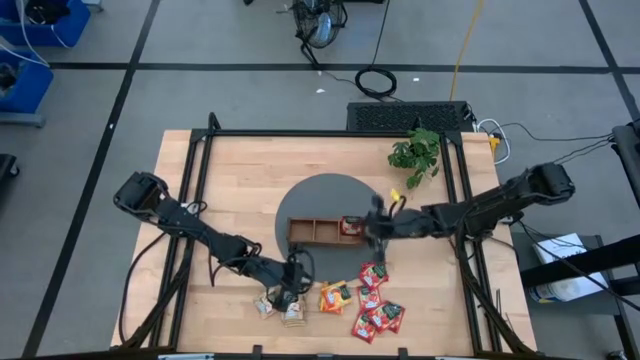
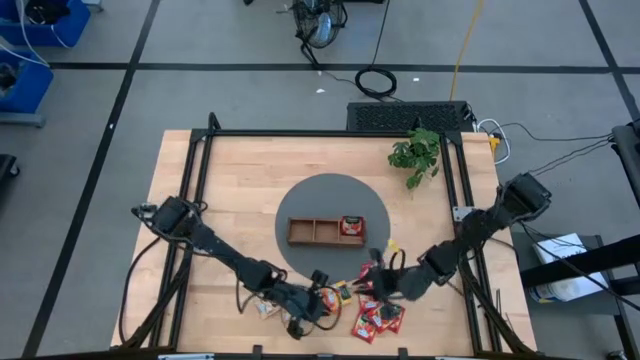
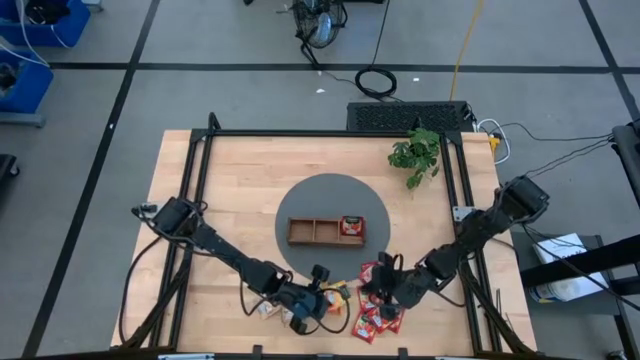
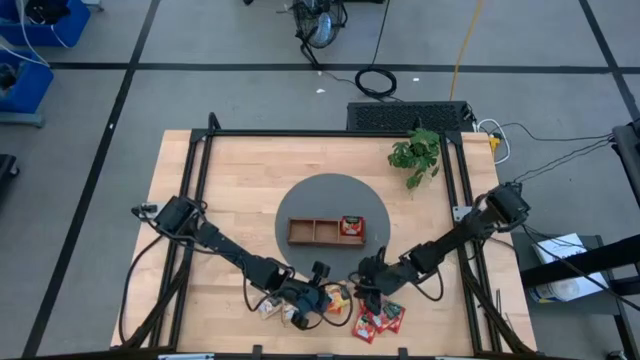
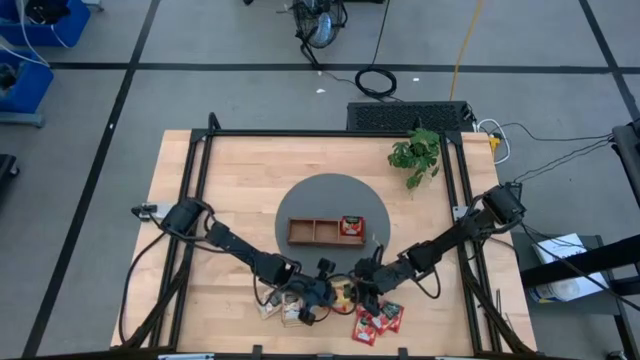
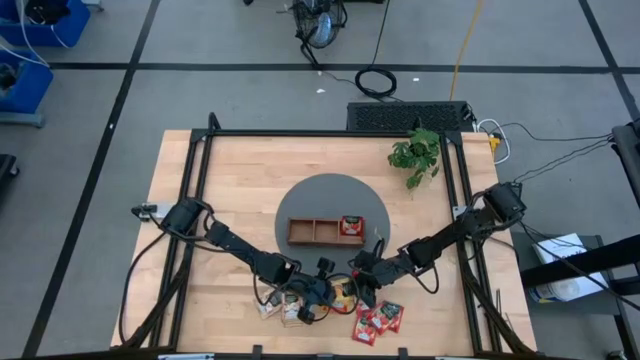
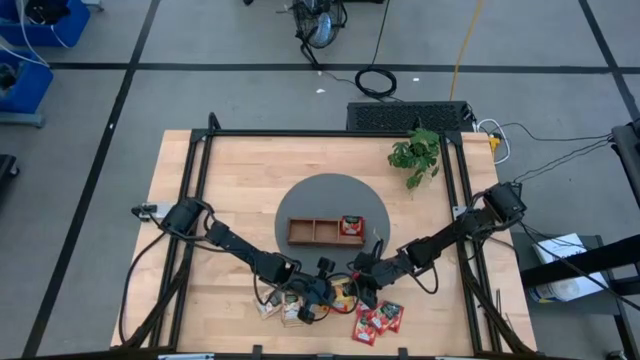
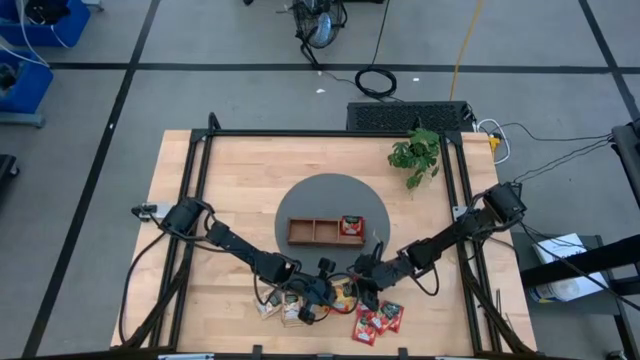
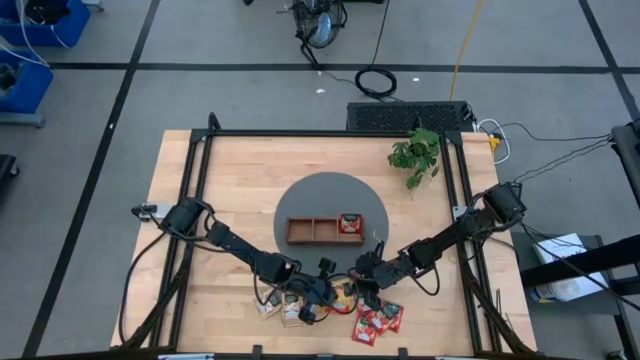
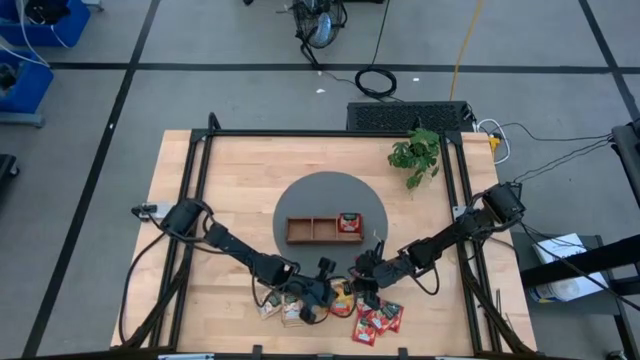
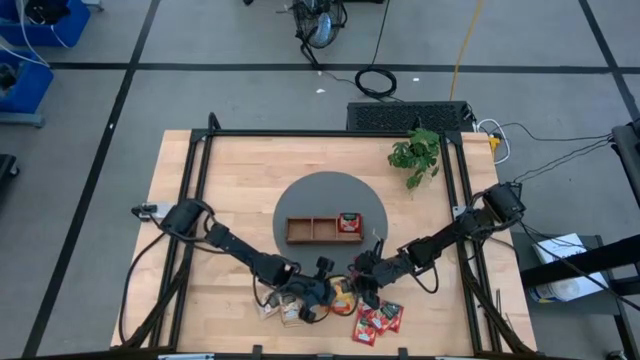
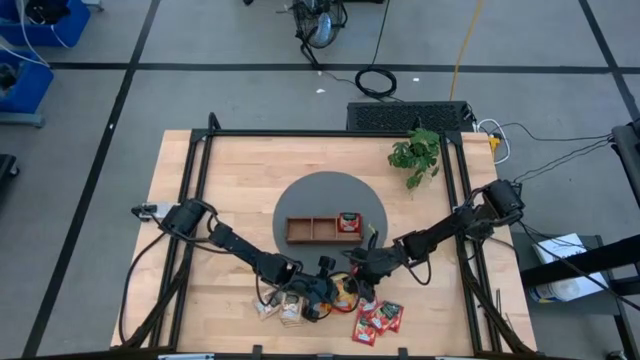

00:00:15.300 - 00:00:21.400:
Task: Pick & Place Tea
Put the yellow tea bag into the middle section of the wooden organizer

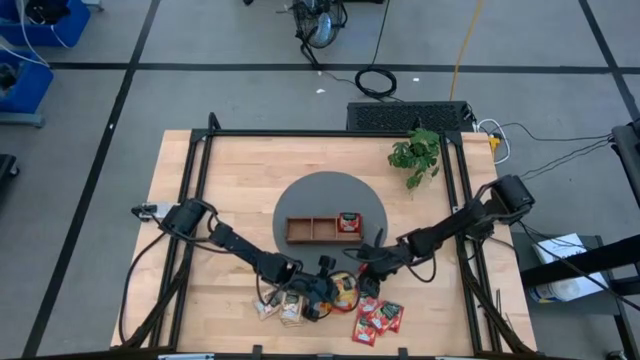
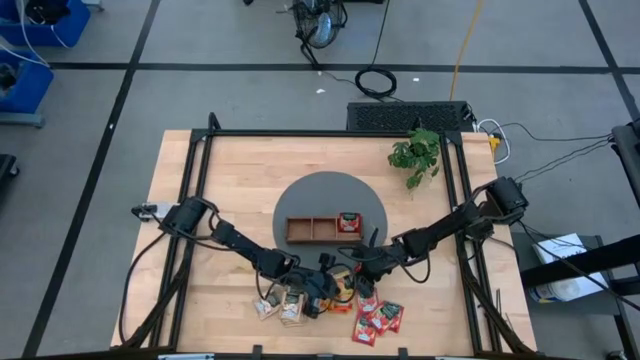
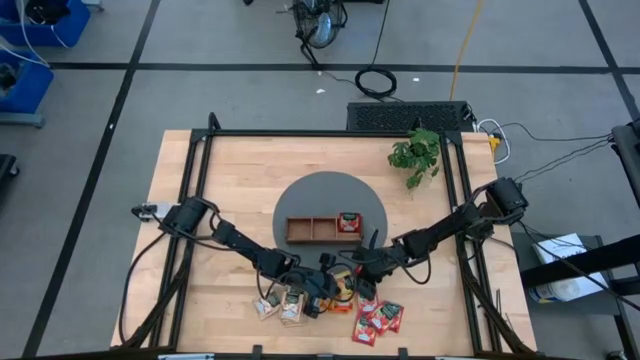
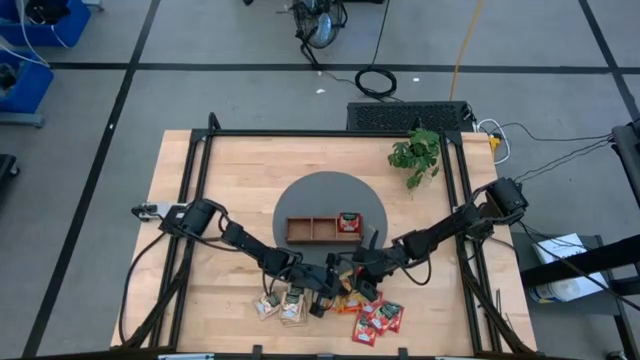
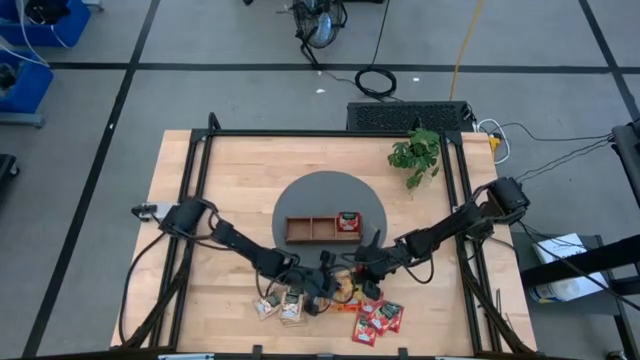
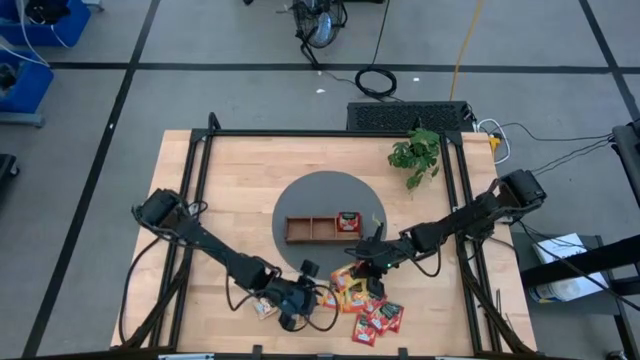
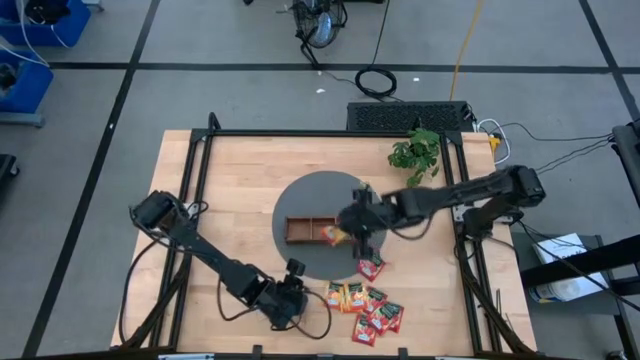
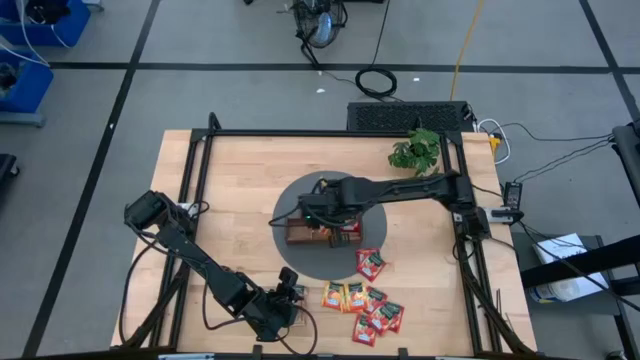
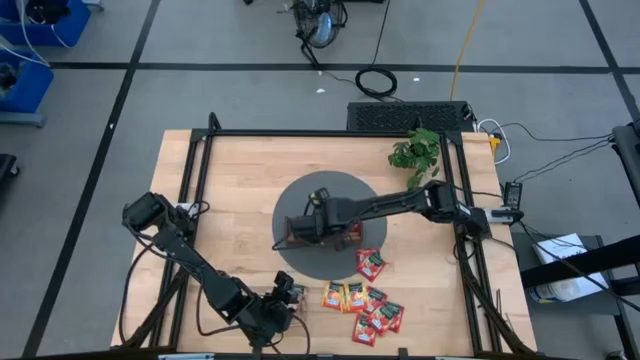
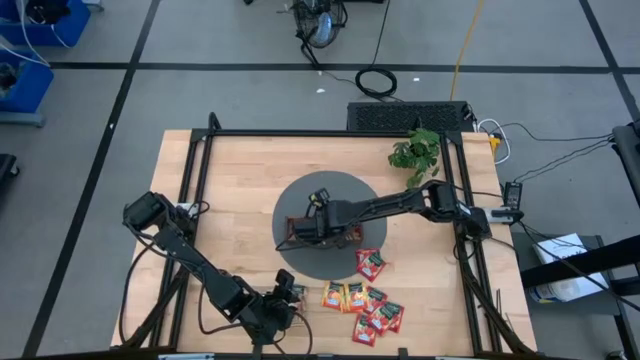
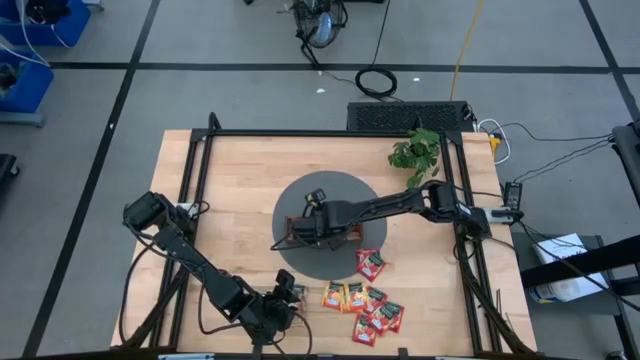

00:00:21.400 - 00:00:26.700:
Put the yellow tea bag into the middle section of the wooden organizer

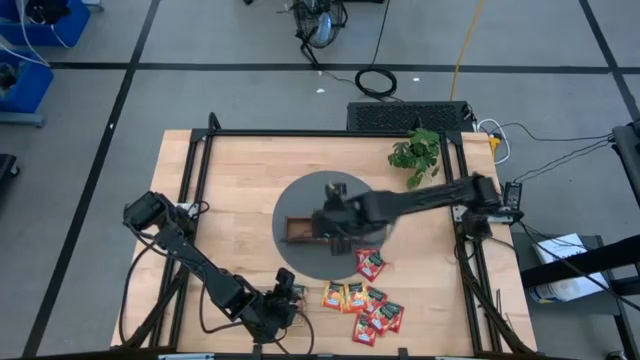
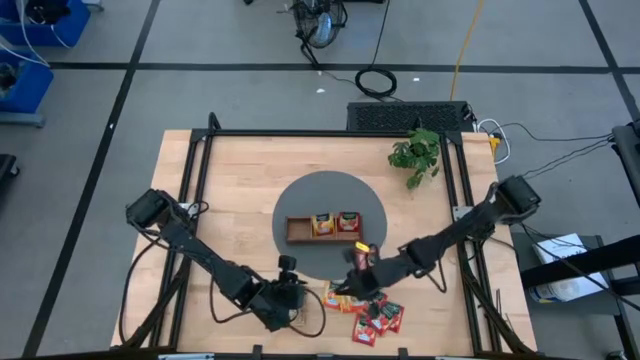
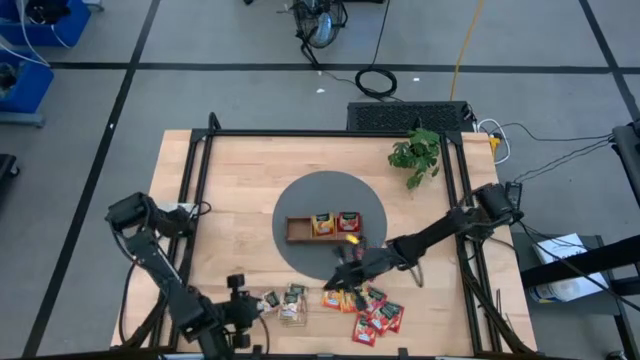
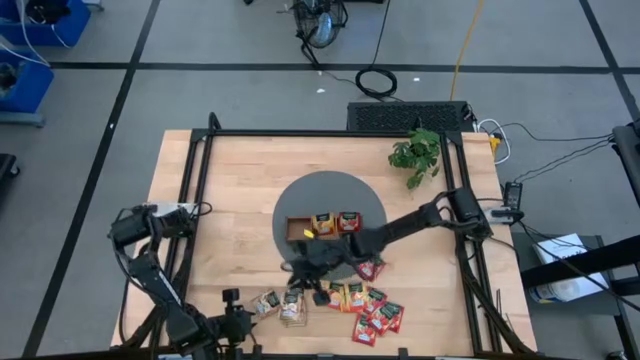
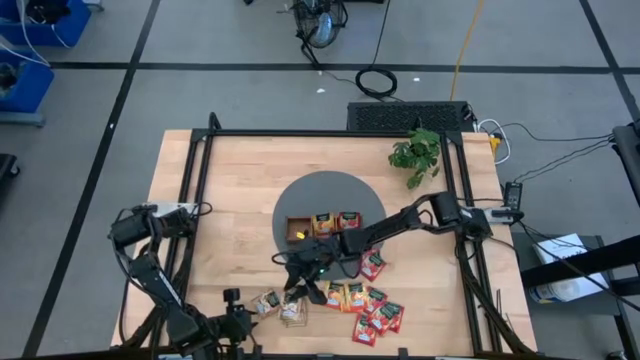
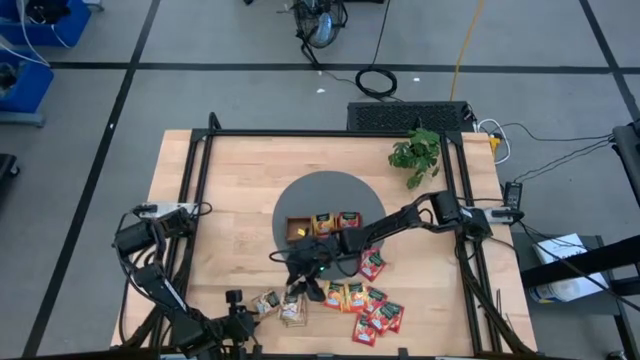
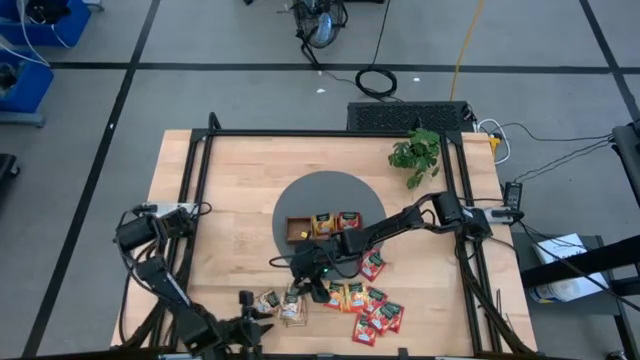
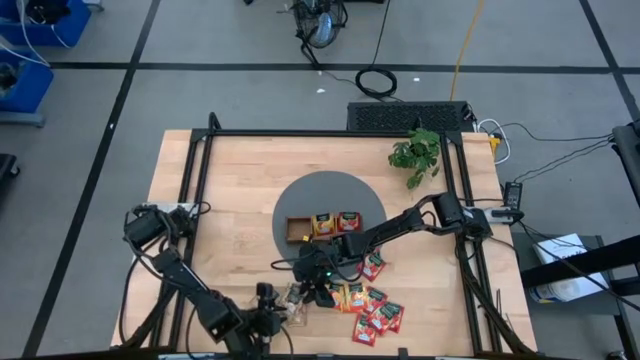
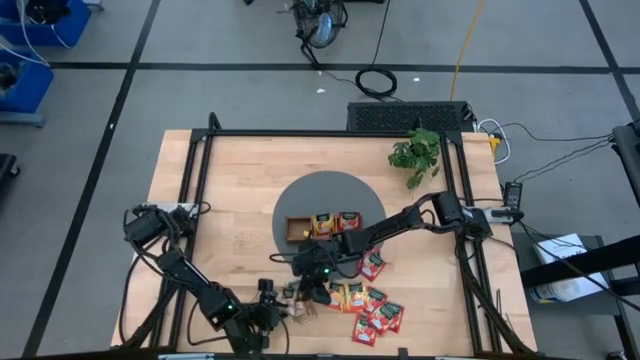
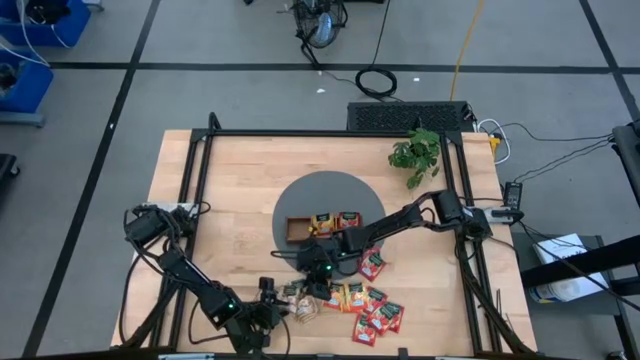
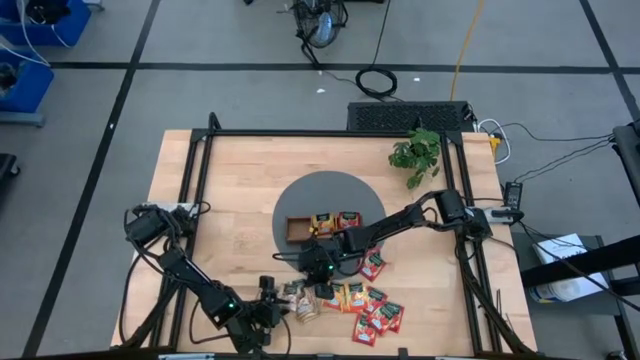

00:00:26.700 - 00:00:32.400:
Put the brown tea bag into the left section of the wooden organizer

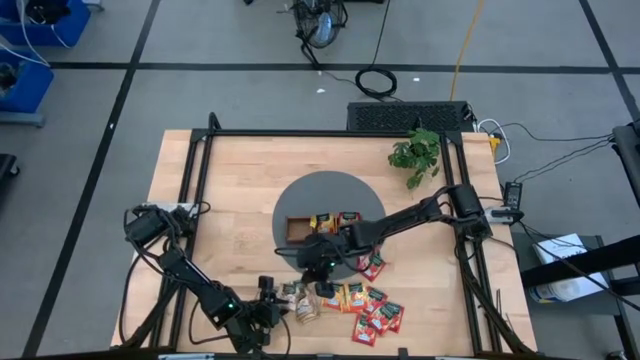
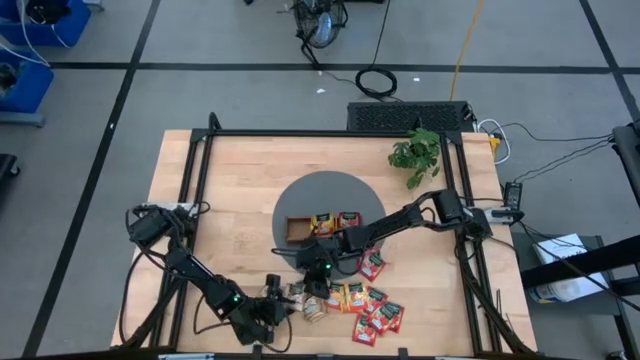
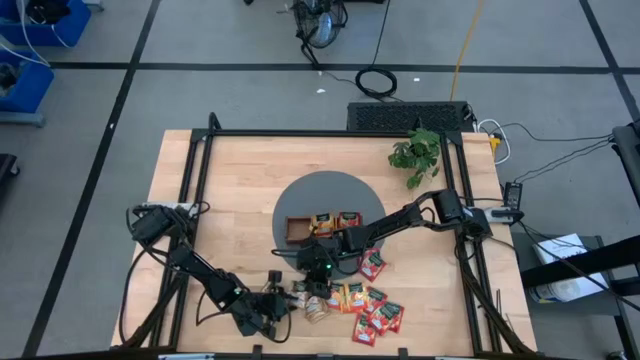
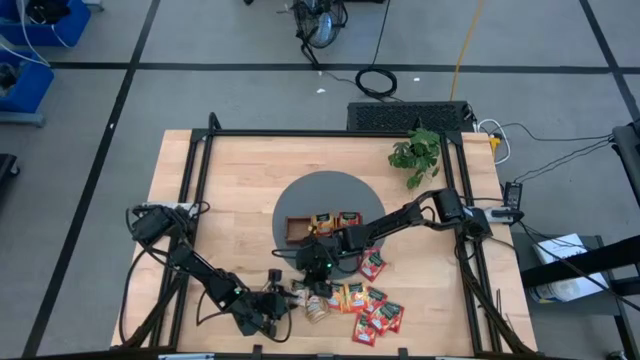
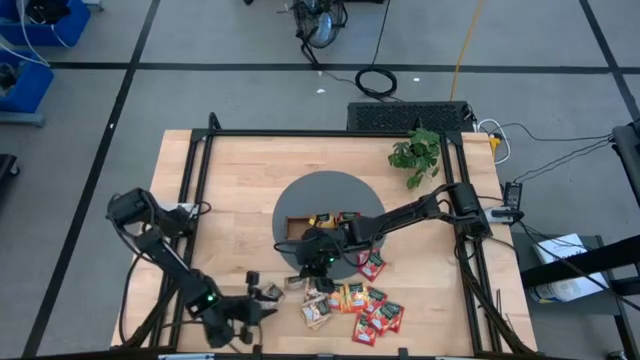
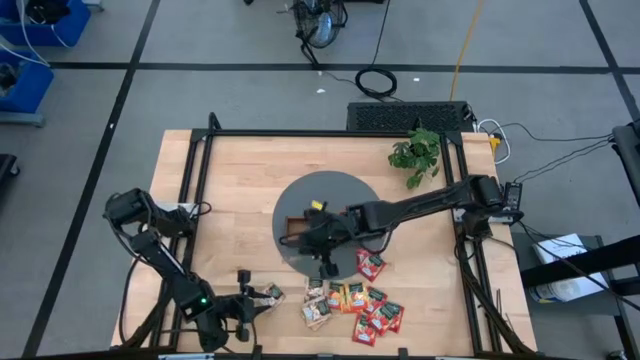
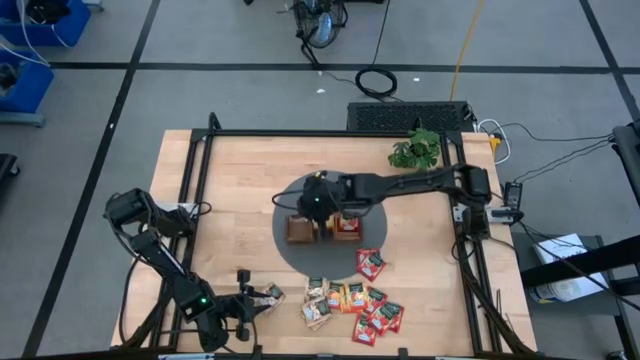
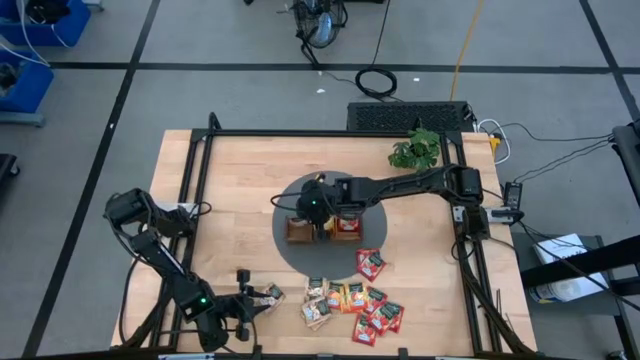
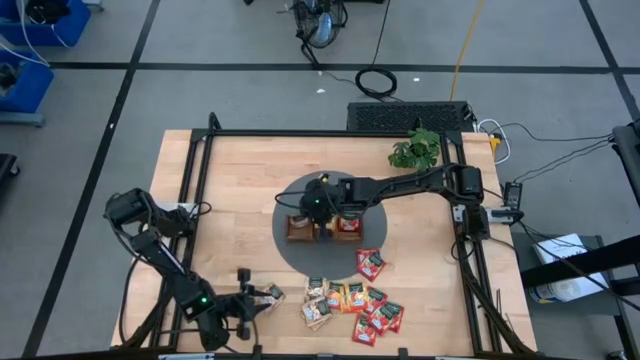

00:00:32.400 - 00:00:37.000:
Put the brown tea bag into the left section of the wooden organizer
